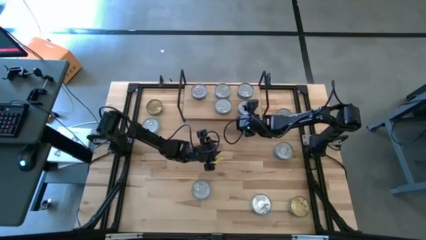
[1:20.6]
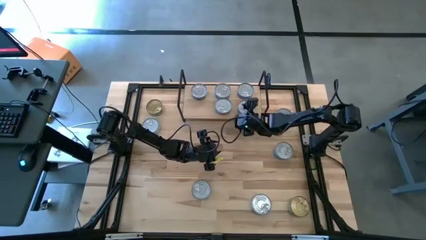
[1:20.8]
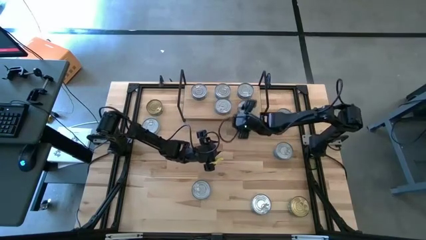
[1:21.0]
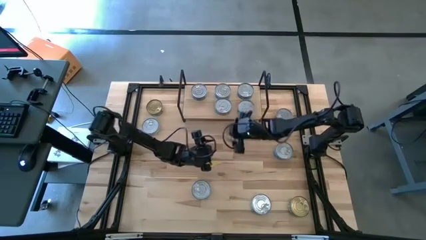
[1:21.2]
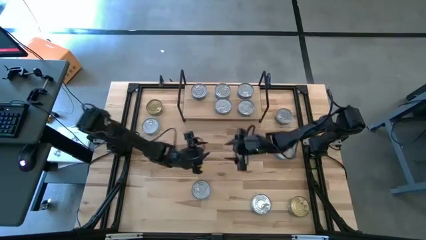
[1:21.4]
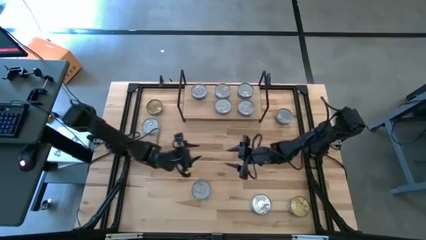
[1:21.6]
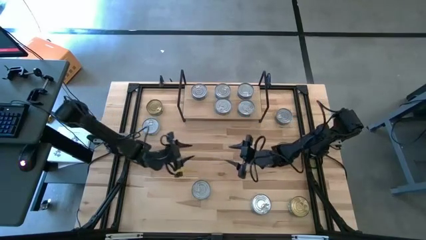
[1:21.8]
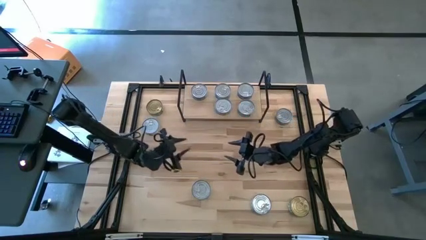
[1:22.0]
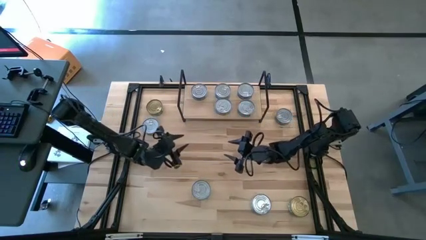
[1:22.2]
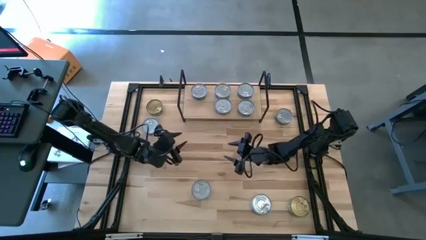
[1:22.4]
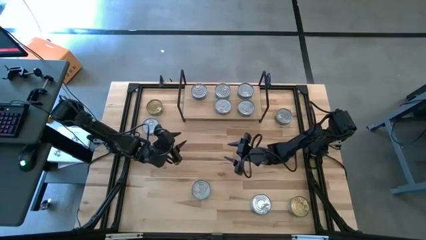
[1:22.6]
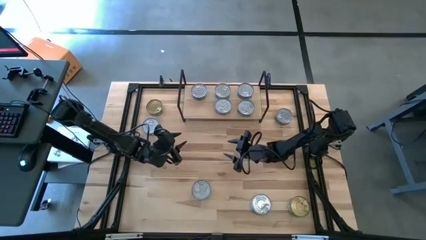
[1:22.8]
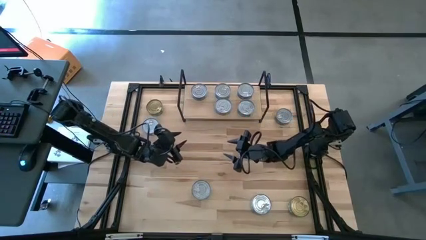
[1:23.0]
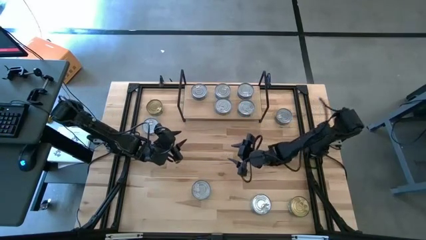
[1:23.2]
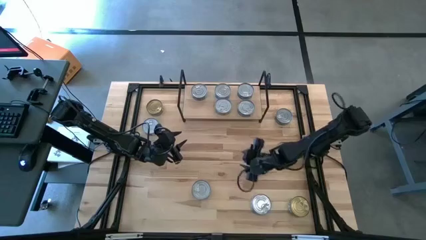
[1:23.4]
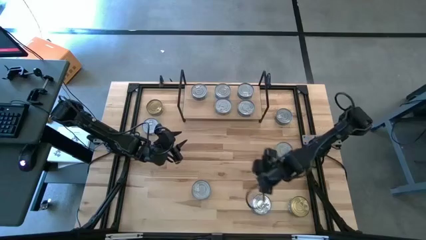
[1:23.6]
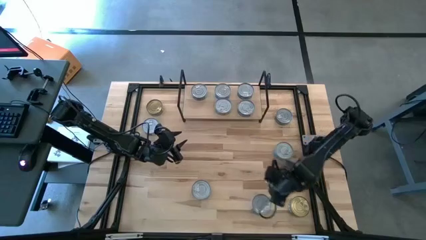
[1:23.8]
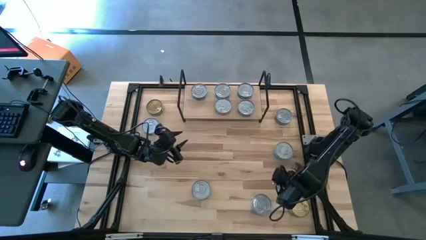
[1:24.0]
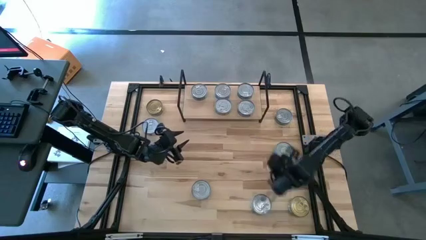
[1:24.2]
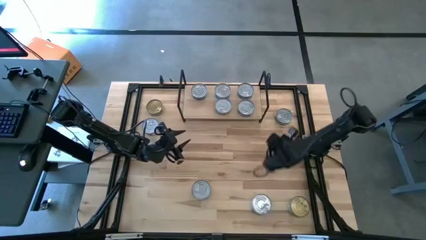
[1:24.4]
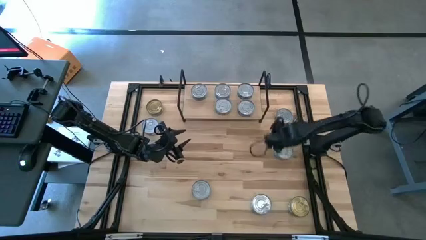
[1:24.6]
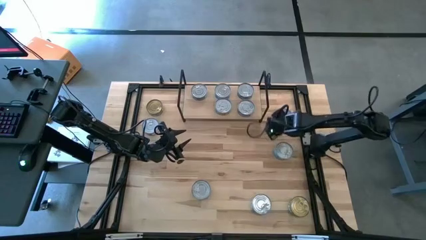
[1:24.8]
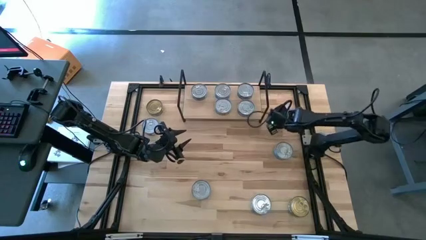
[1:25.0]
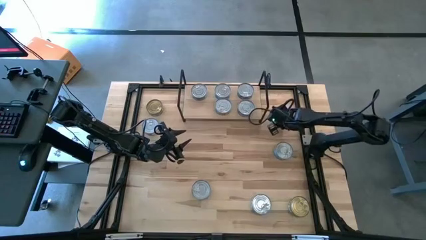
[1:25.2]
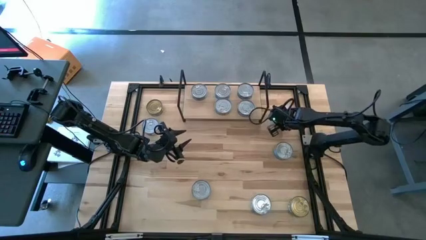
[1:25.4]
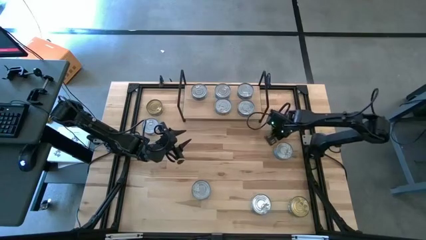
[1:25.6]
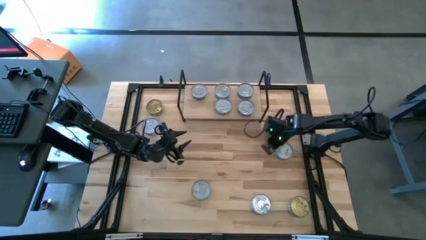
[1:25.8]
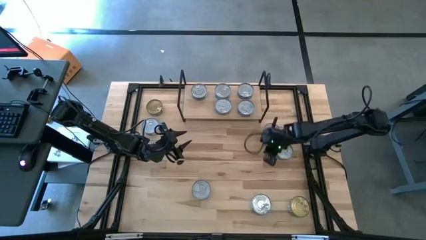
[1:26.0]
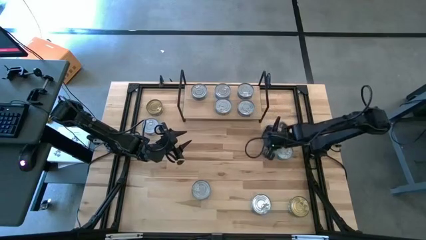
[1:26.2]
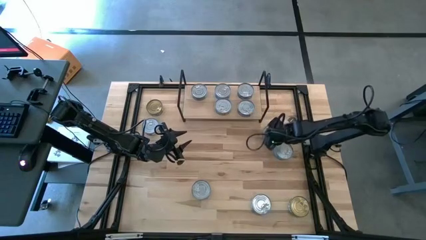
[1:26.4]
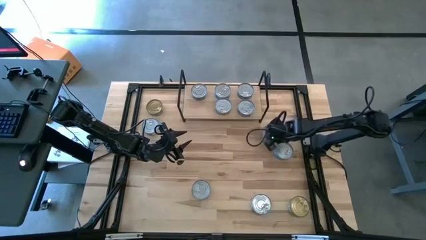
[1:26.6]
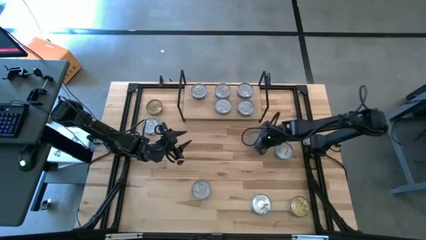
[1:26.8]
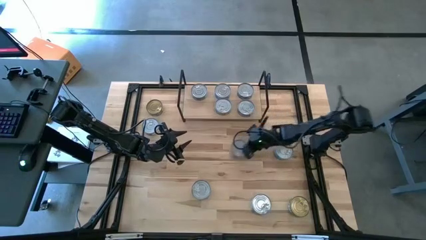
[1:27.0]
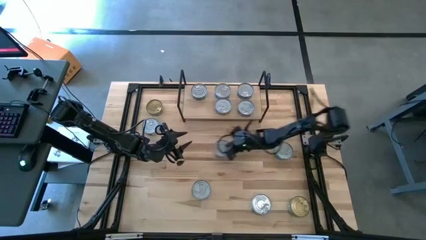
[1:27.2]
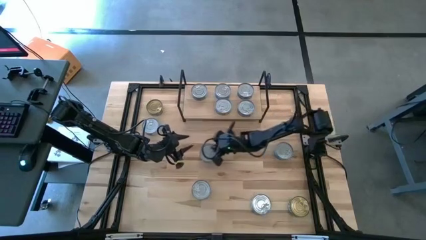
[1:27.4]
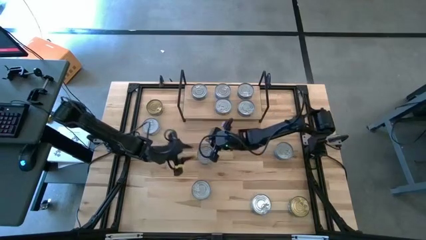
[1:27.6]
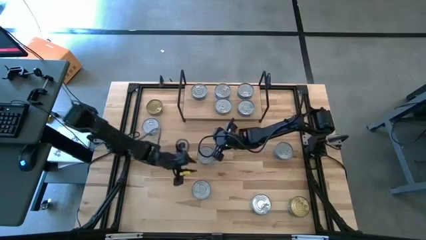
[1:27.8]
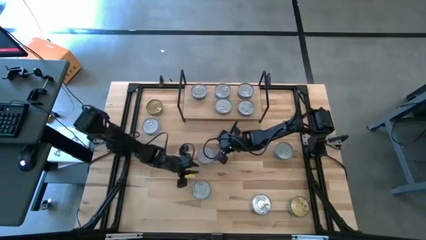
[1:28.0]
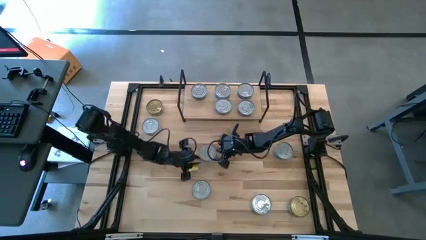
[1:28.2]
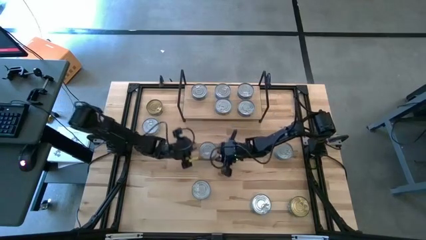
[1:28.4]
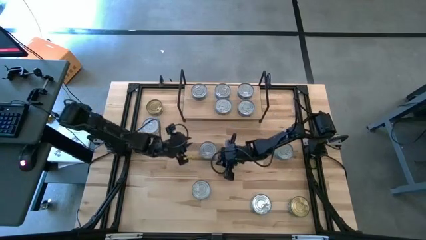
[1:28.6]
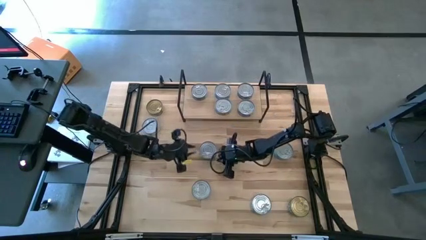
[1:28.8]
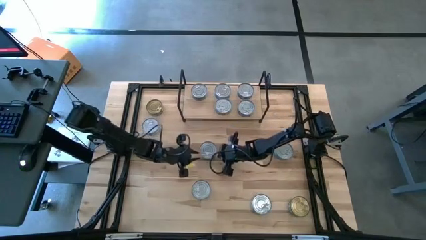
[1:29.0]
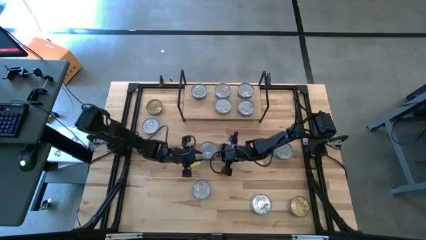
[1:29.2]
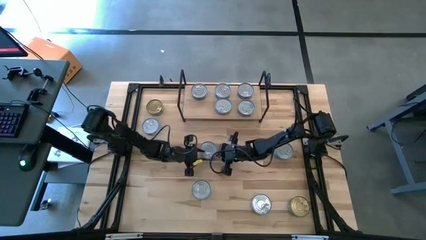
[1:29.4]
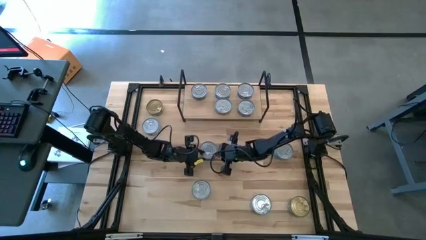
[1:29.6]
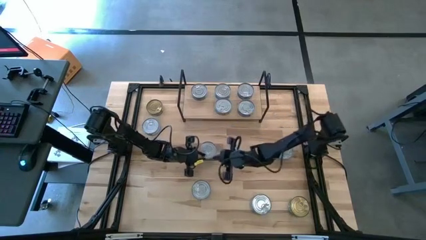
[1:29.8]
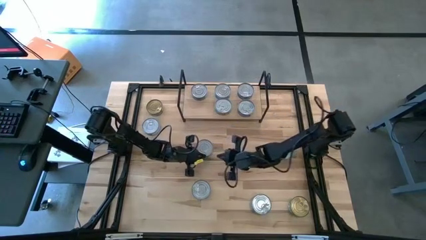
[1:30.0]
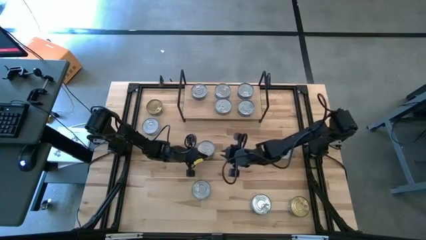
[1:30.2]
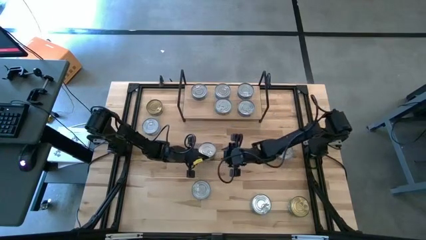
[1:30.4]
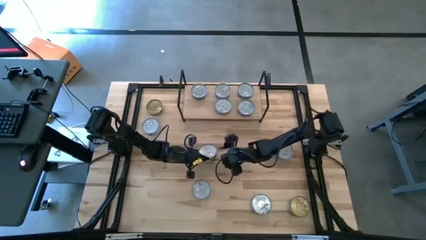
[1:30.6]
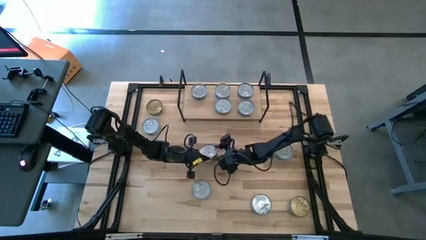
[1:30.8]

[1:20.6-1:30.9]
Task: Stack canned seafood by type on shelf
Put the green tuna can aligned with the other green tuna can on the shelf
